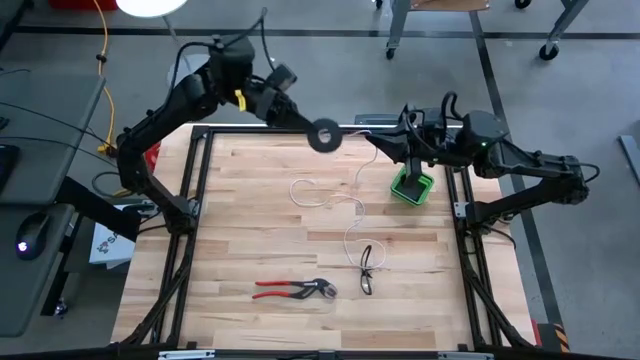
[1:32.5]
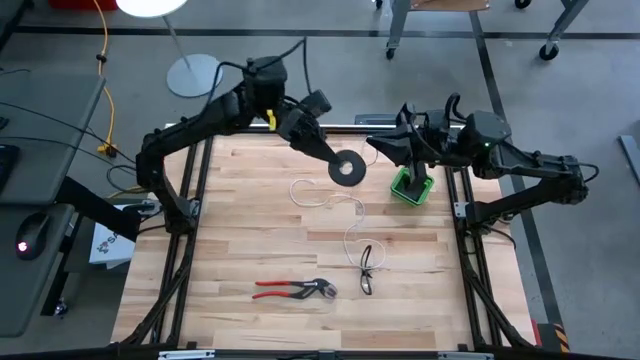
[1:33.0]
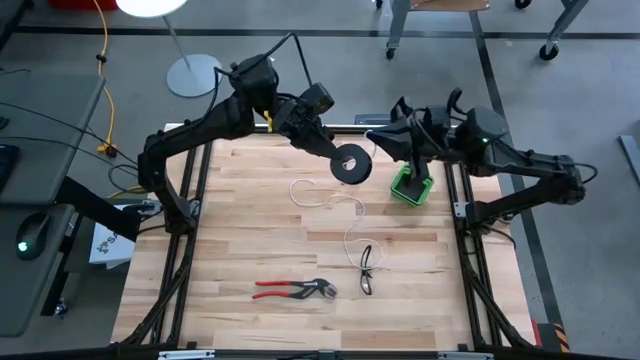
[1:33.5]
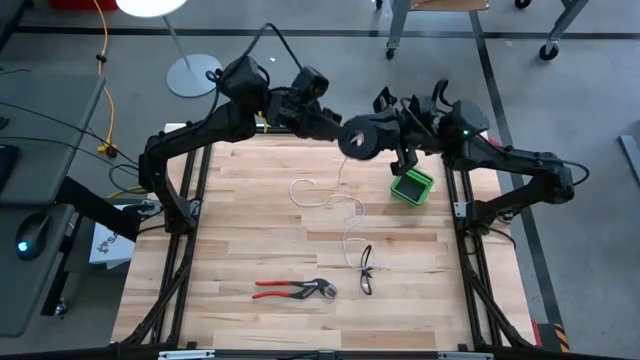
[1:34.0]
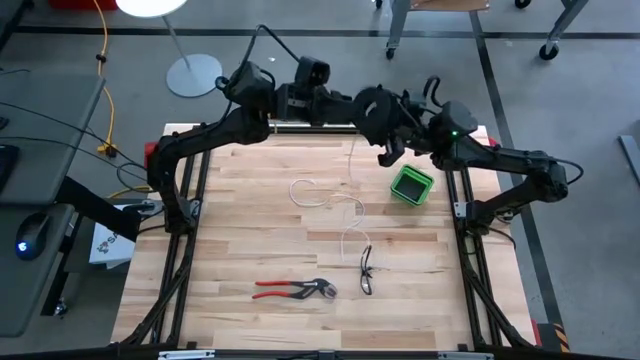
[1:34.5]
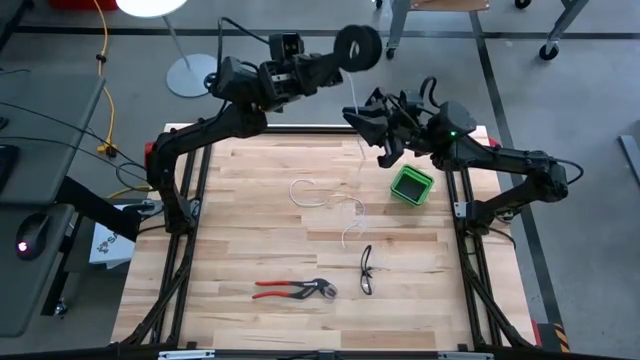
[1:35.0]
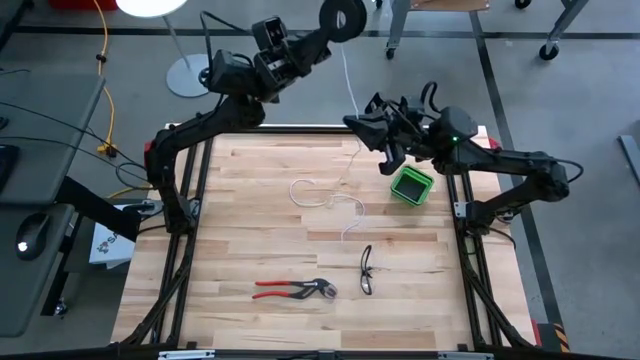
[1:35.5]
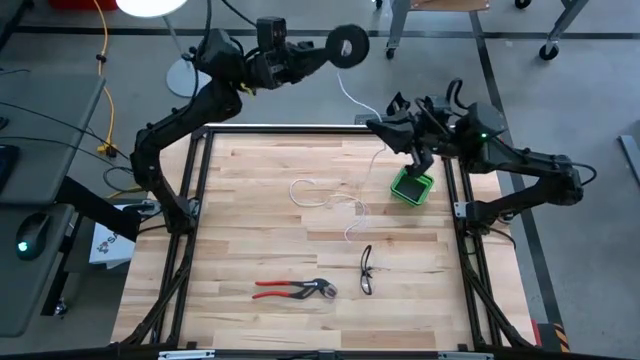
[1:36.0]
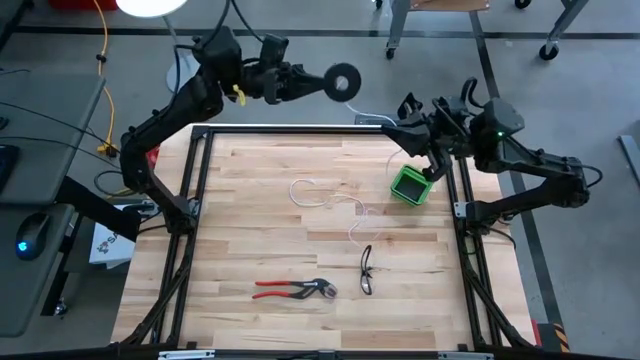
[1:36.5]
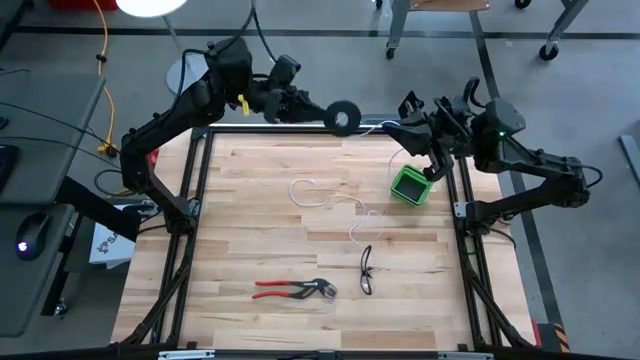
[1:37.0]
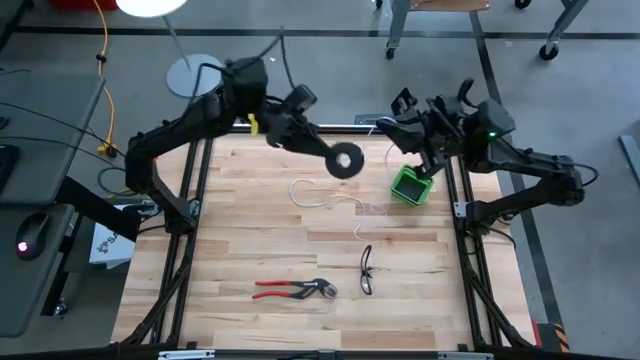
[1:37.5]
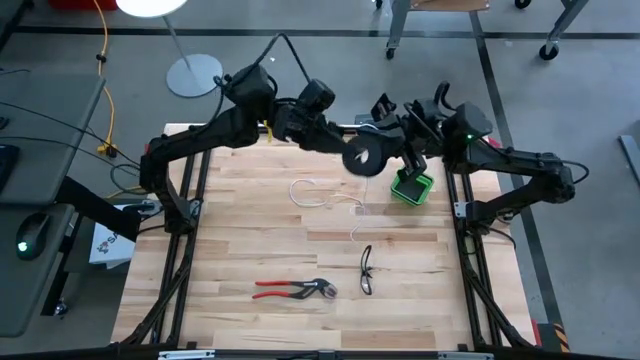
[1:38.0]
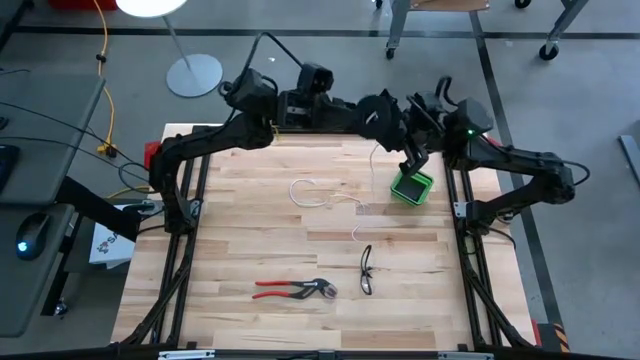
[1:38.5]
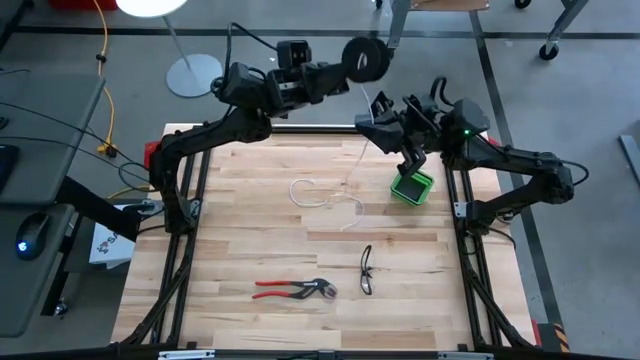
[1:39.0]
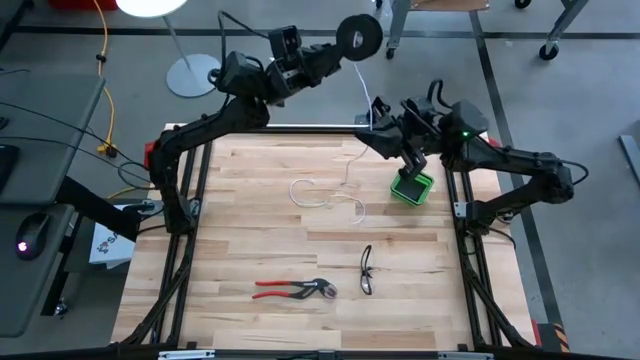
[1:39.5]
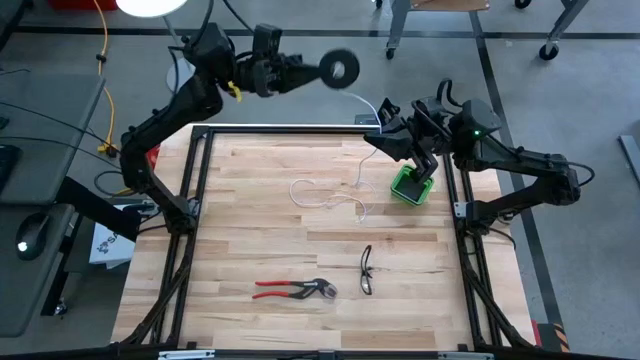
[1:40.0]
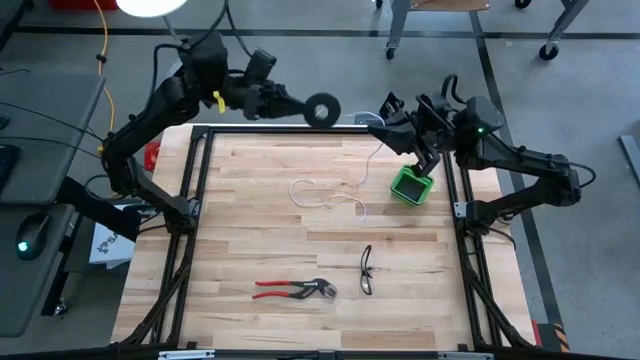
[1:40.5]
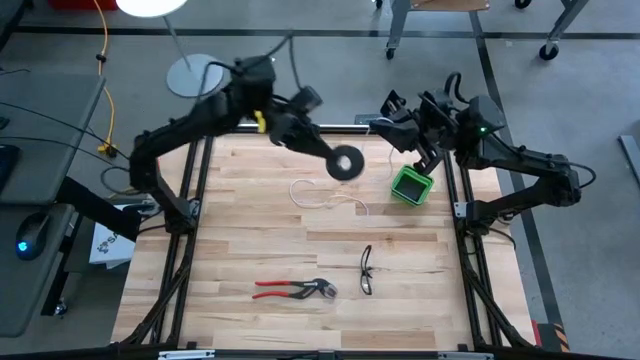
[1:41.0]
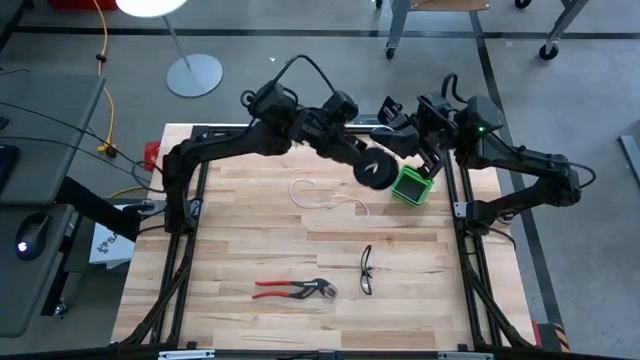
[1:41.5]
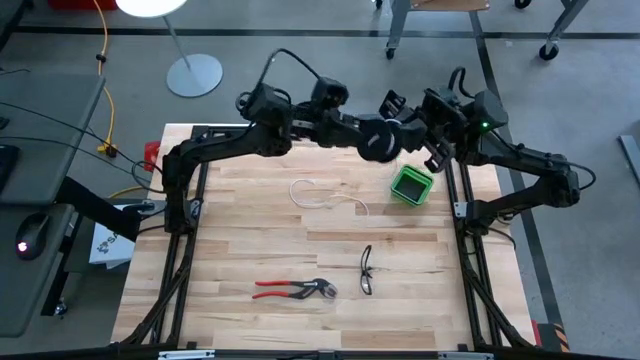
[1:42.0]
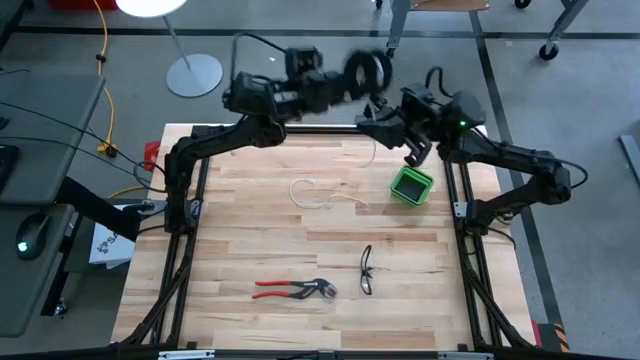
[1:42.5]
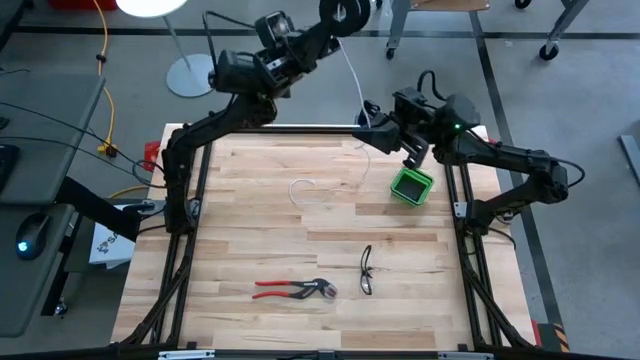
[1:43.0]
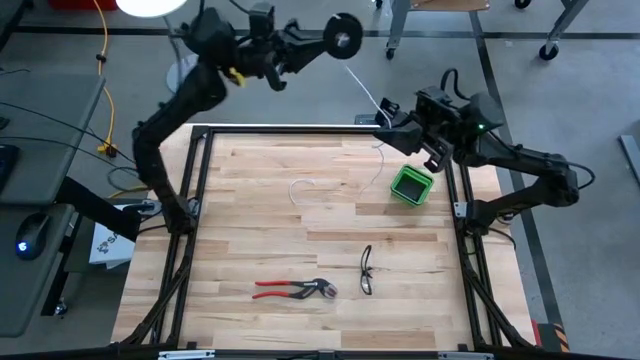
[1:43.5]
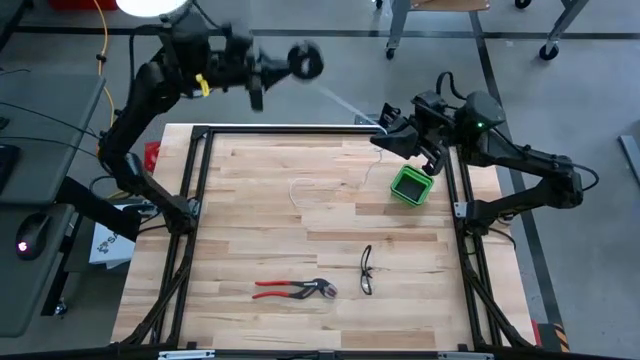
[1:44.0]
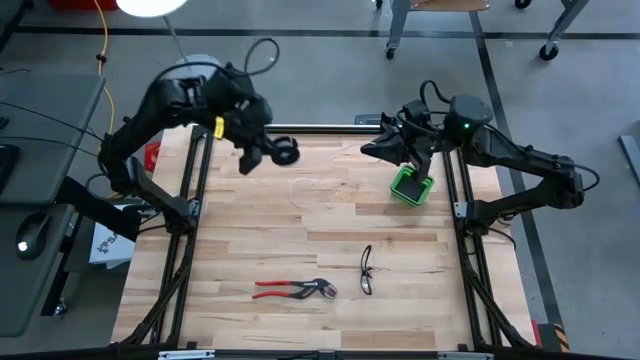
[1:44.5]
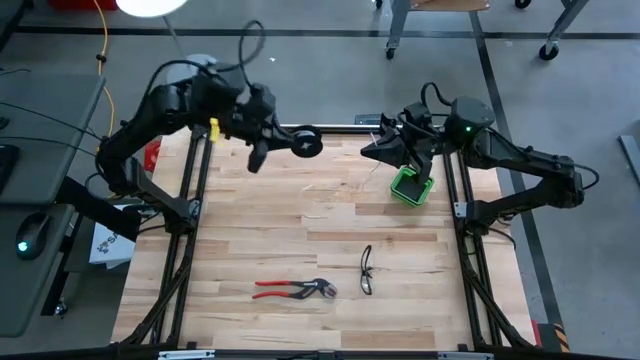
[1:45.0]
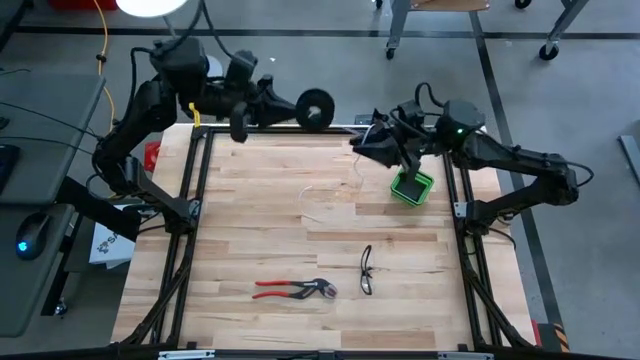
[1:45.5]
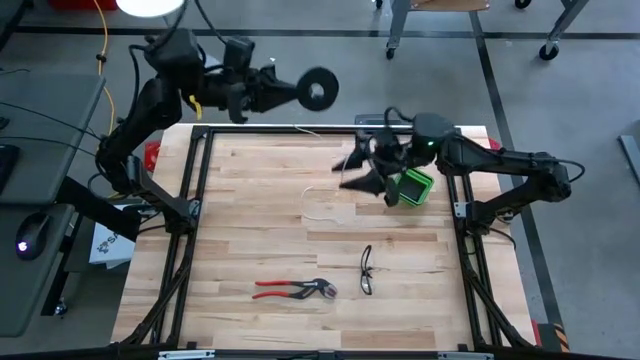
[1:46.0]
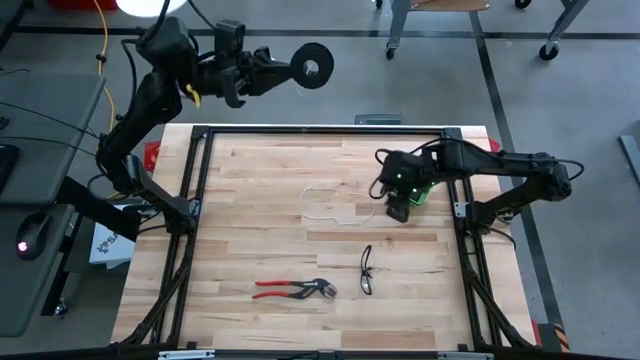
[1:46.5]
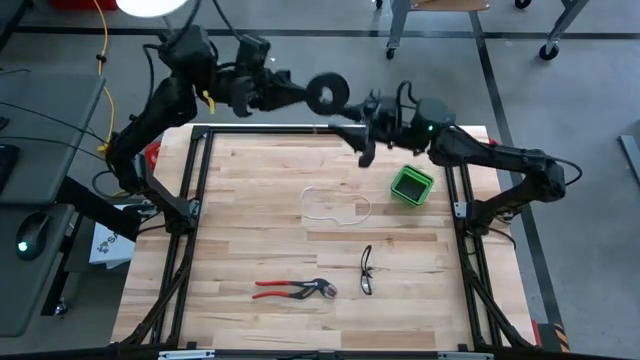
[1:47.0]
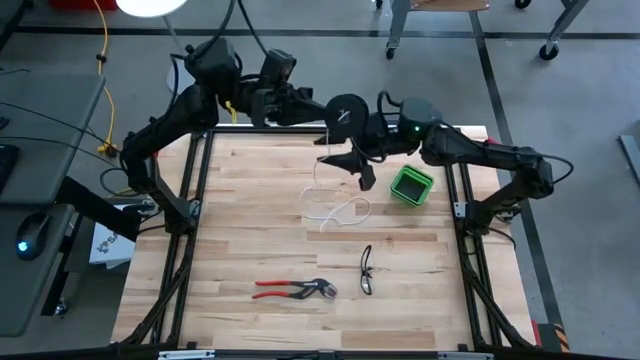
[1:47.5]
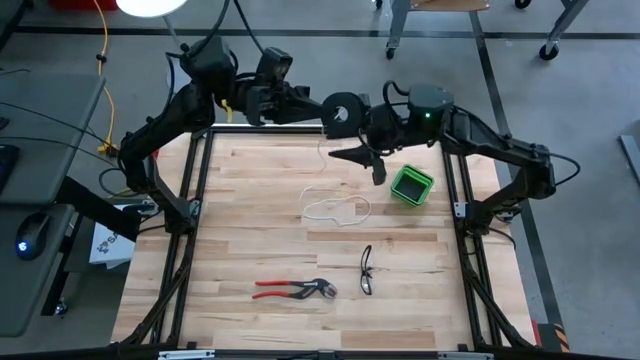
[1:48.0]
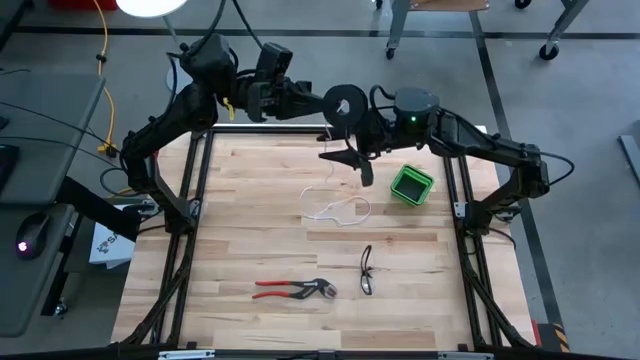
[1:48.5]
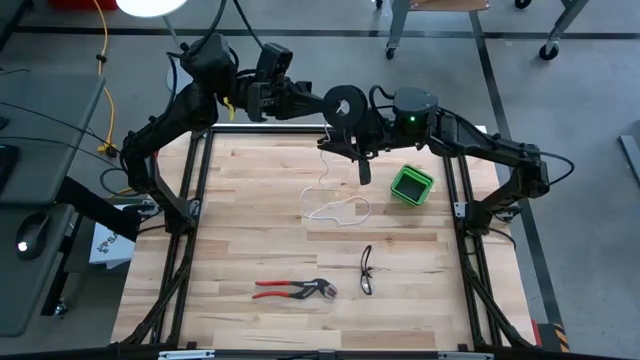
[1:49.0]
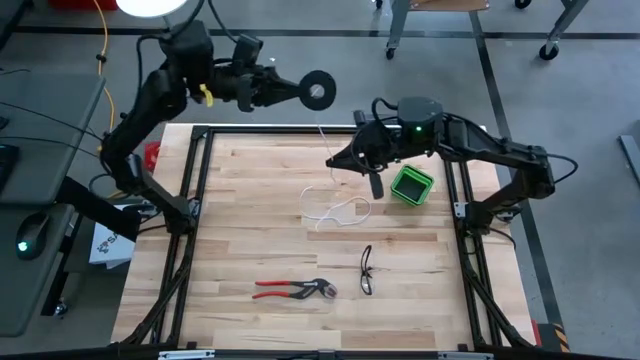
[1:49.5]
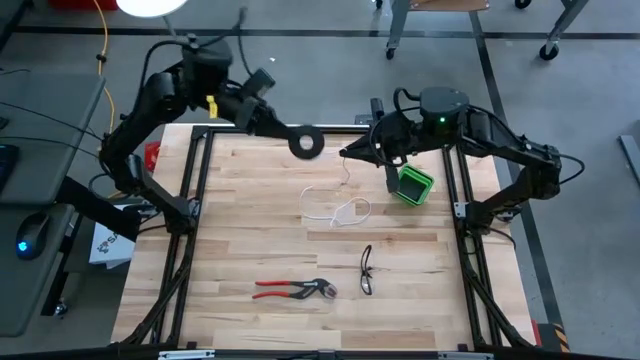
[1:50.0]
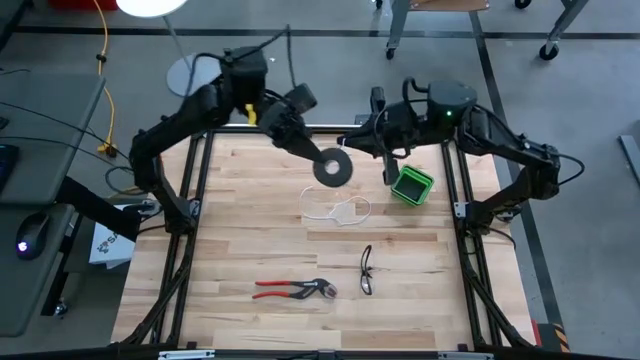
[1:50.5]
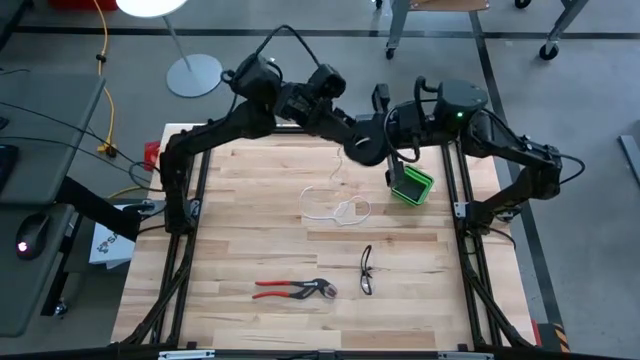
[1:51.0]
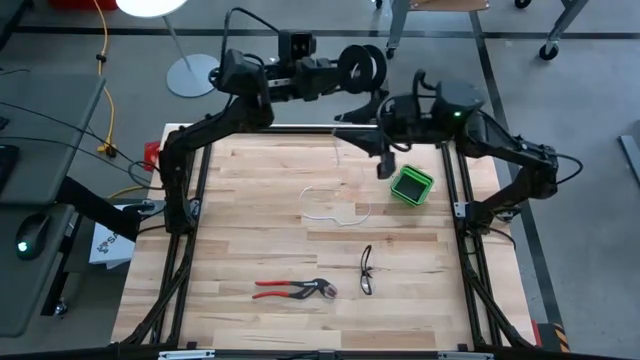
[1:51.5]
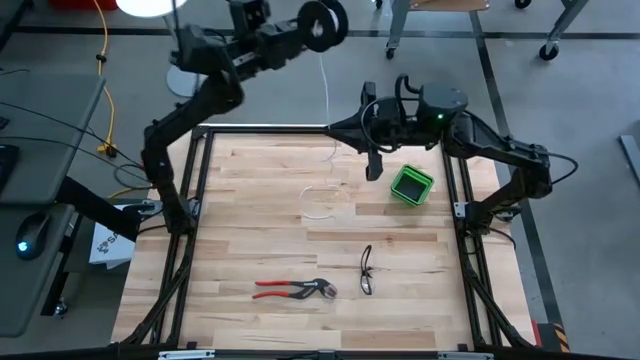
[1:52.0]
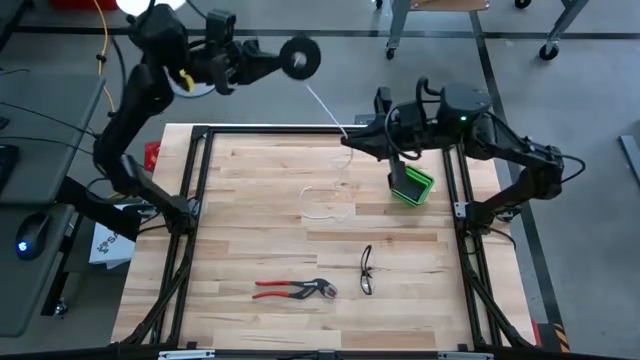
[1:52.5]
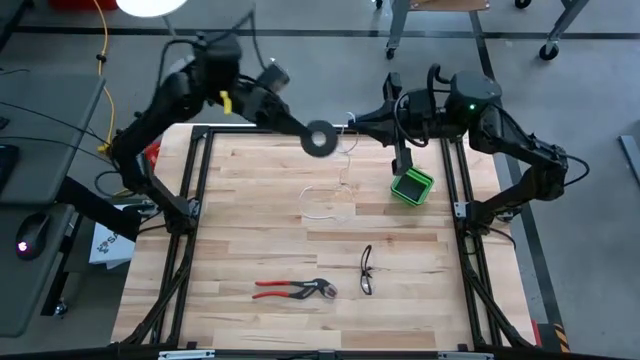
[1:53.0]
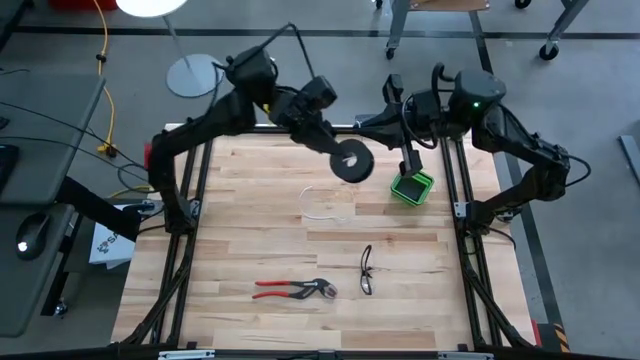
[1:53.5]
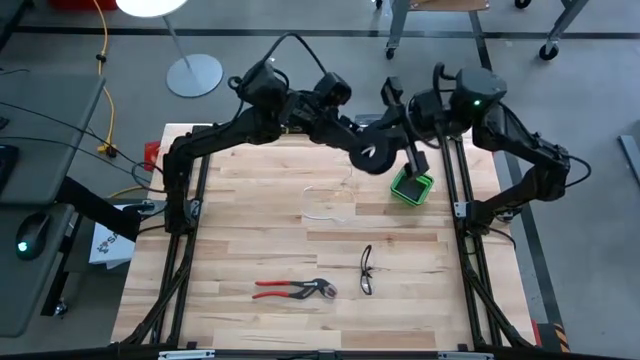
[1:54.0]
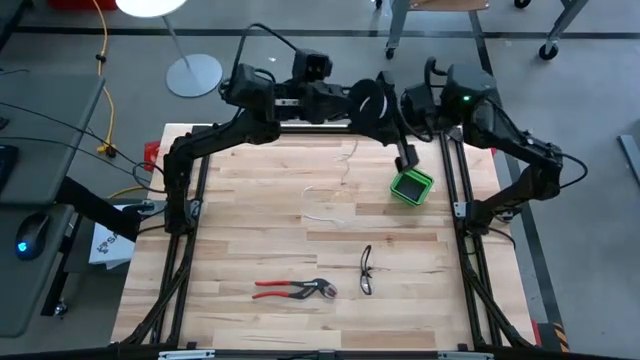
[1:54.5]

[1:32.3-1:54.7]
Task: Coil cords
Coil the wire into the spool

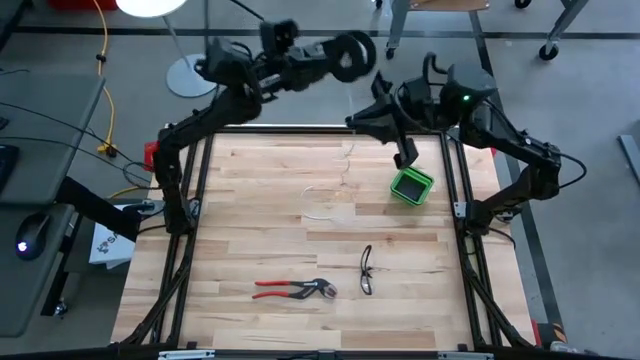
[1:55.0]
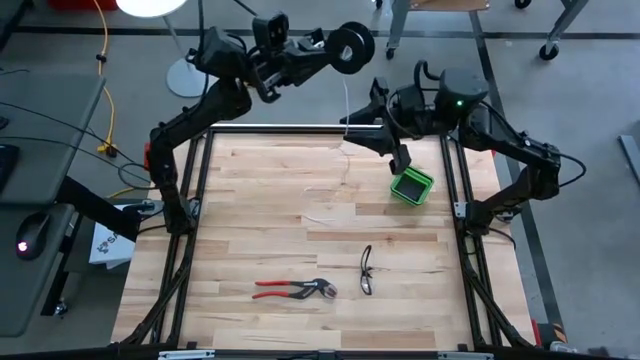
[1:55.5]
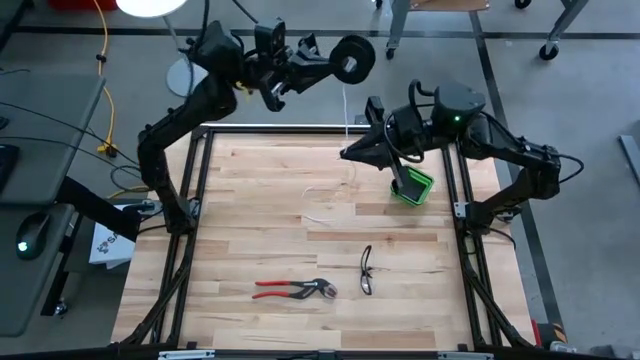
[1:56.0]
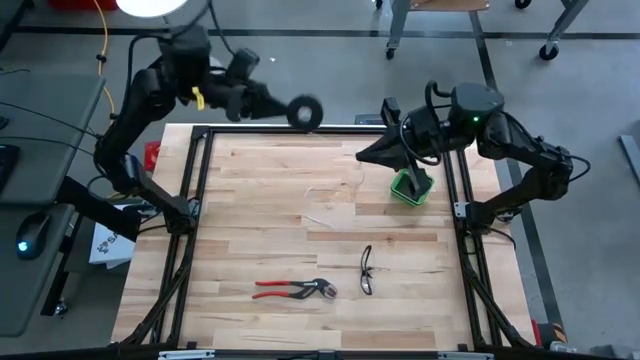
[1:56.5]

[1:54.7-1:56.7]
Coil the wire into the spool
